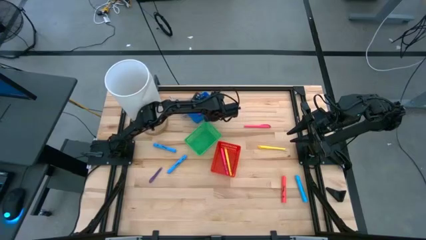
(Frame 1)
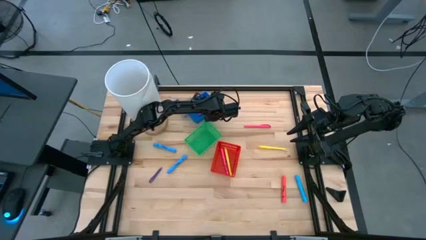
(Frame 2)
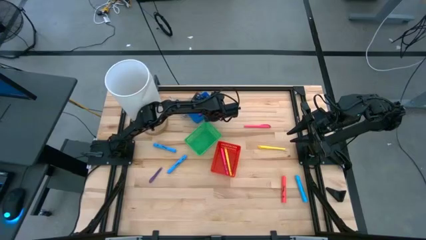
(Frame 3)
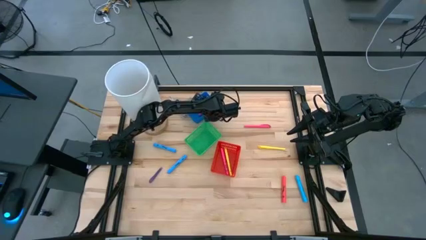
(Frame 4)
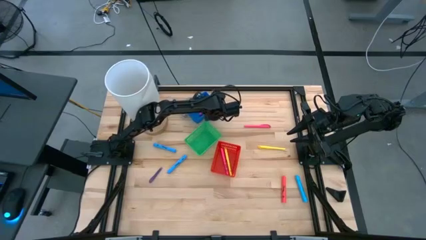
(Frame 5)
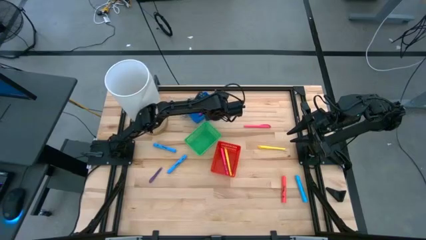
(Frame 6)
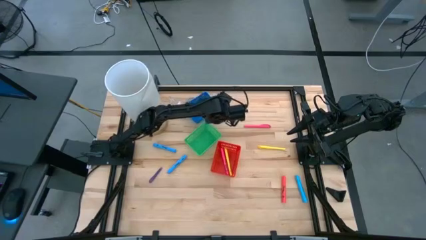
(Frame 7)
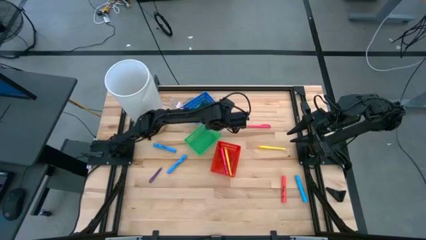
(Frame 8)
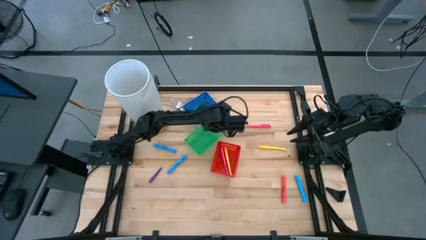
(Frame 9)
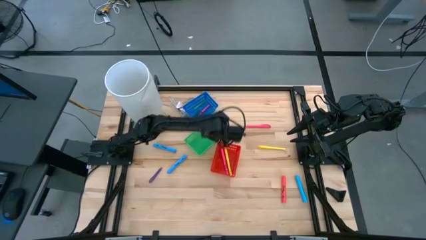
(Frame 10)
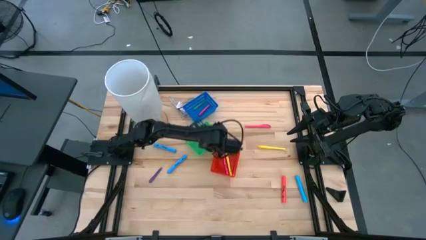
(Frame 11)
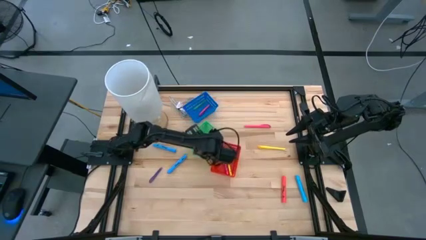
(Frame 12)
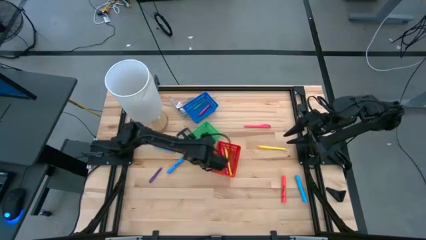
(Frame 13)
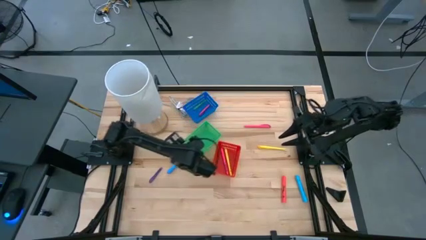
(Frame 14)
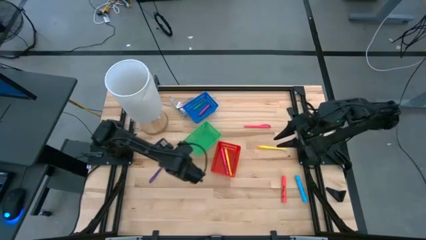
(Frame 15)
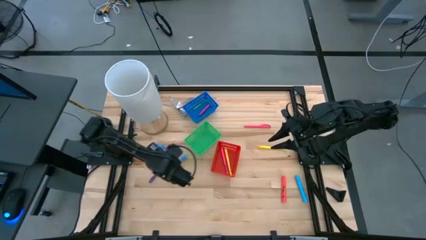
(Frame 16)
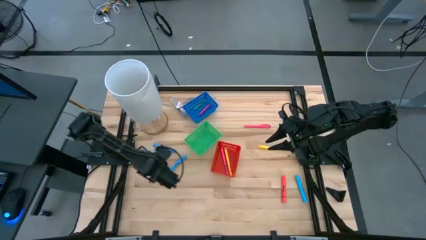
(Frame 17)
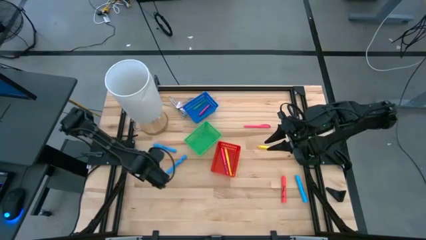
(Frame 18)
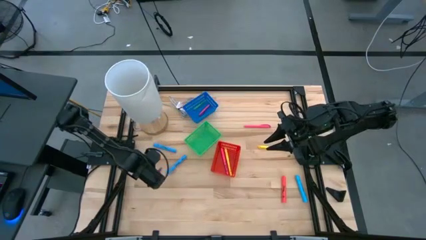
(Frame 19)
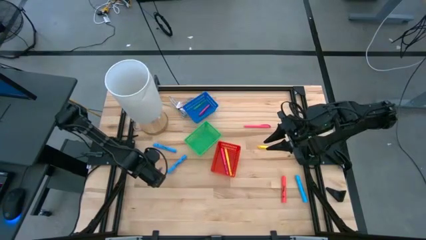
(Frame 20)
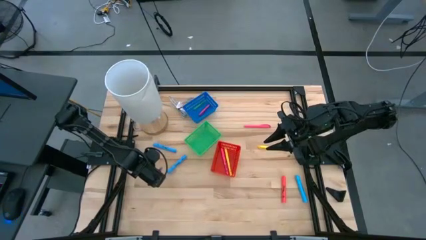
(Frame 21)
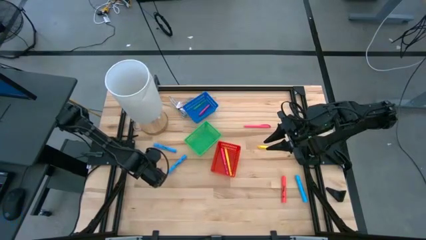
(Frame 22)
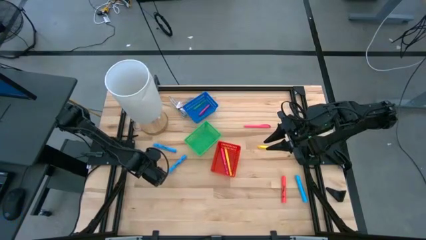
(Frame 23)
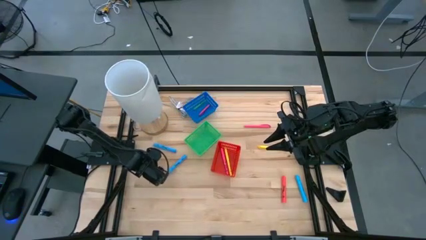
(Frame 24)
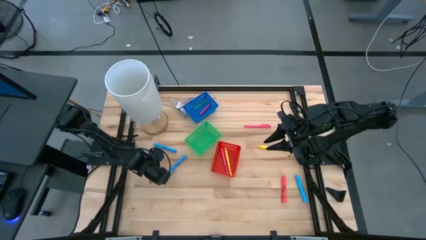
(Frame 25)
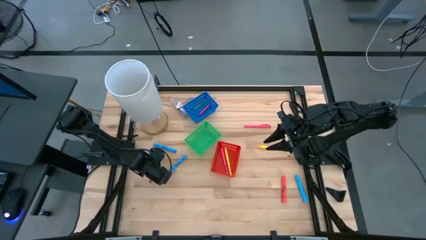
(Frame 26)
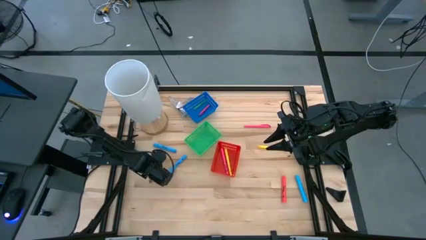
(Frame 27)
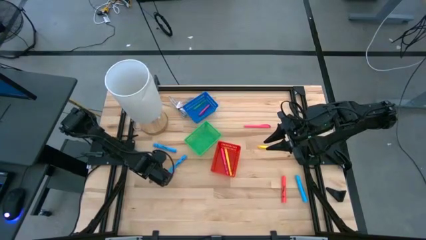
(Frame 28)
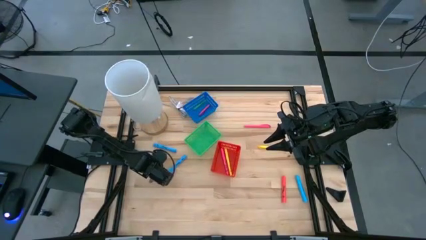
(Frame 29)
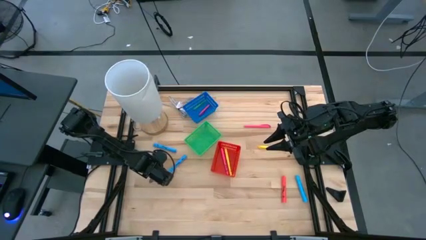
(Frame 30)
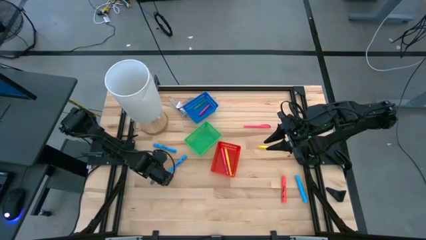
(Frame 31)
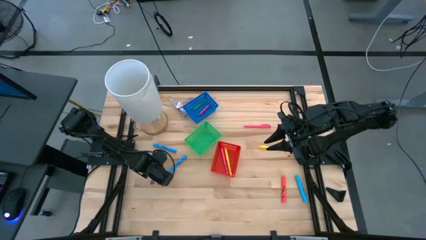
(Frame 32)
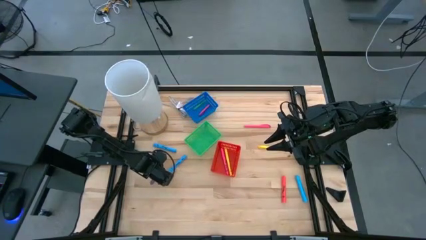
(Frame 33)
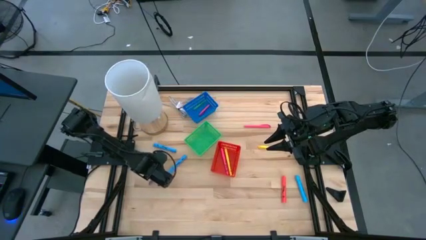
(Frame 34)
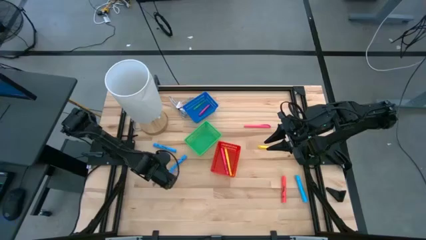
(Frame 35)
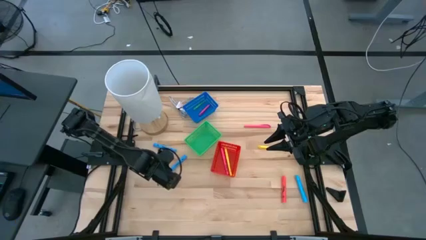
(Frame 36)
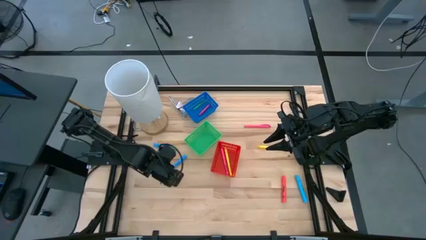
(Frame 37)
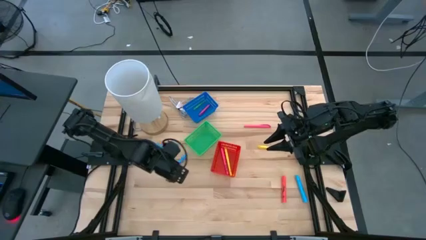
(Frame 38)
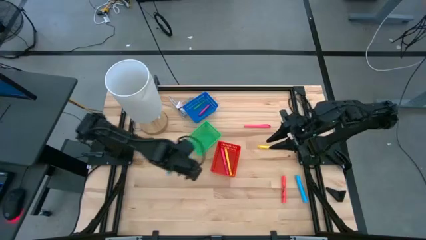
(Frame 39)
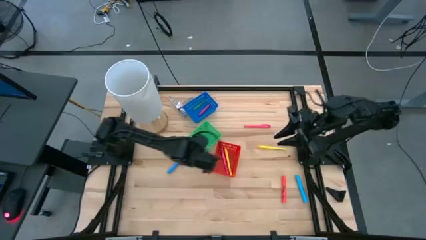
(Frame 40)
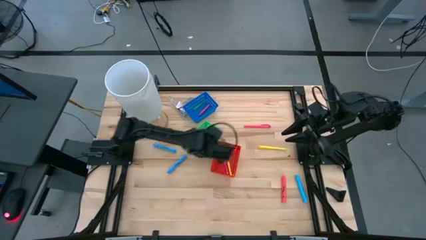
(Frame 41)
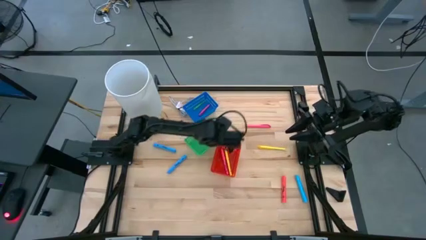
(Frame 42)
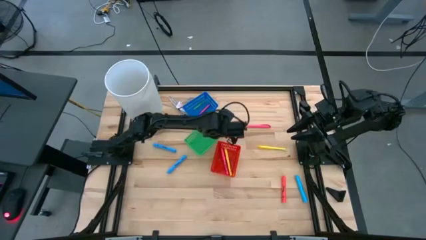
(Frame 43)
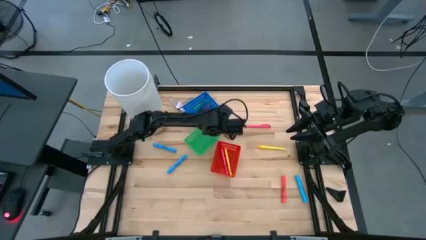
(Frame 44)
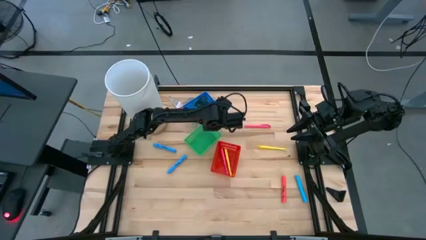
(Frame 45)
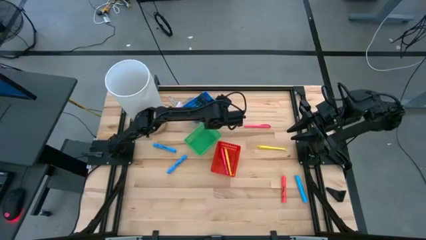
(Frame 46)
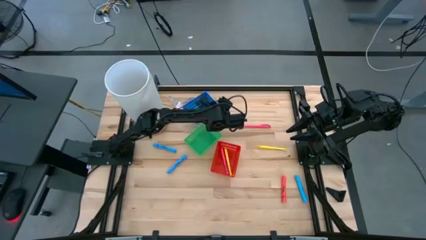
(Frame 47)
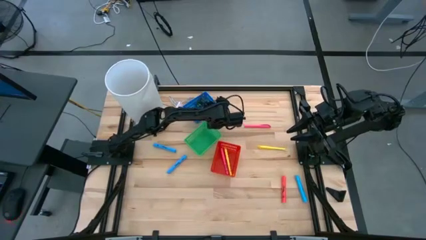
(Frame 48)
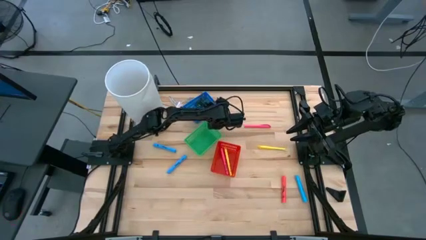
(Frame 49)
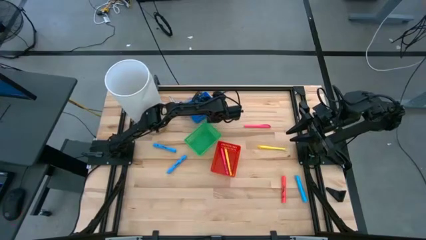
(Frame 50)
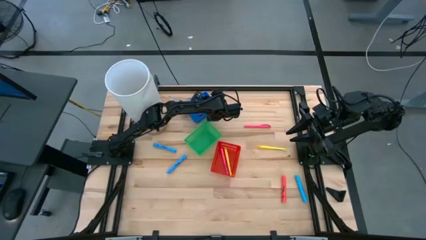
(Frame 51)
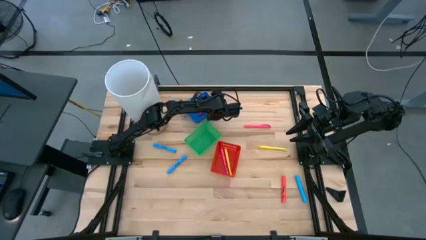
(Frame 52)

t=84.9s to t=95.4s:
Task: Pick & Place Markers
Put the small purple pen into the blue bin

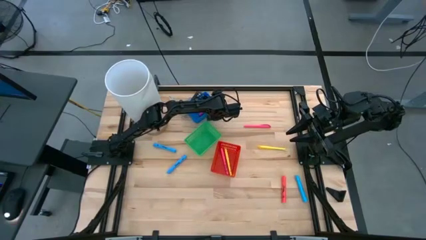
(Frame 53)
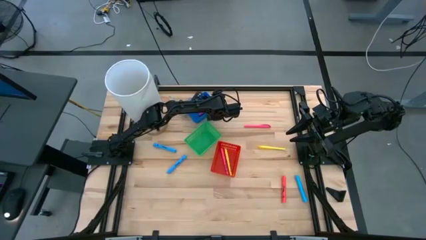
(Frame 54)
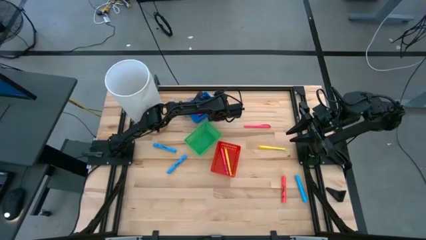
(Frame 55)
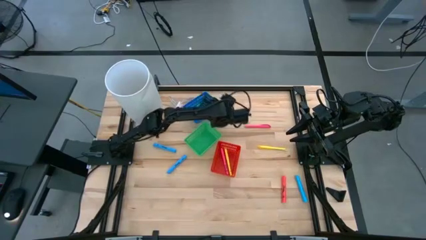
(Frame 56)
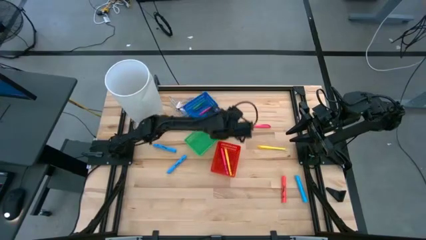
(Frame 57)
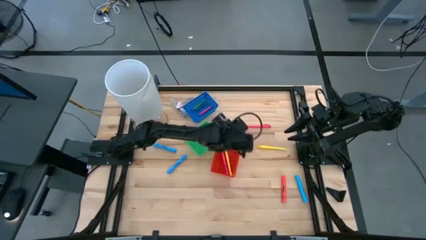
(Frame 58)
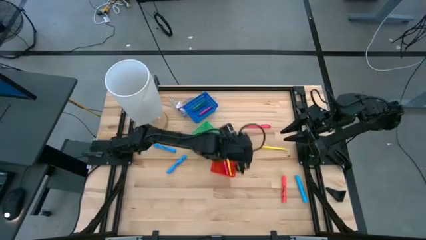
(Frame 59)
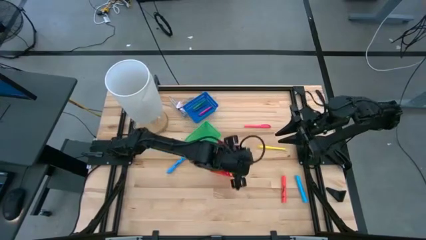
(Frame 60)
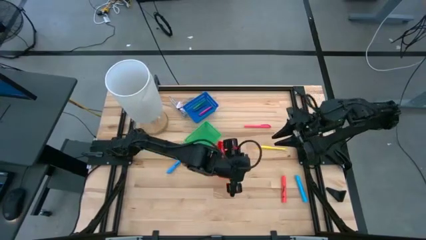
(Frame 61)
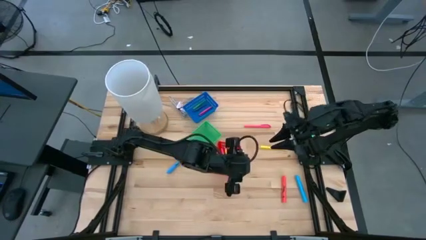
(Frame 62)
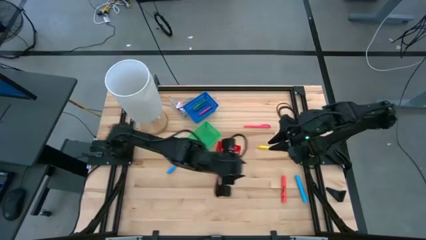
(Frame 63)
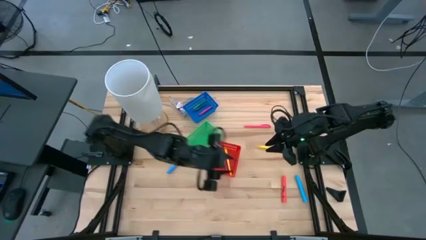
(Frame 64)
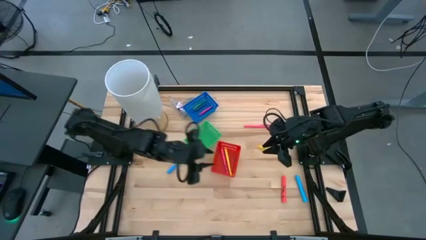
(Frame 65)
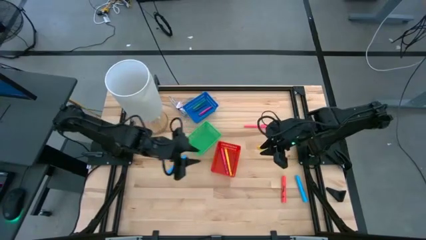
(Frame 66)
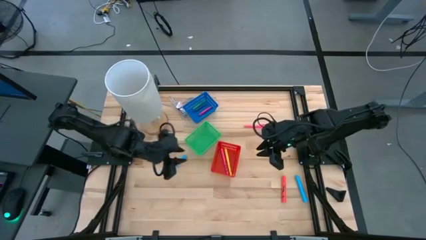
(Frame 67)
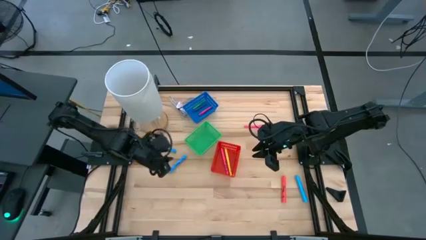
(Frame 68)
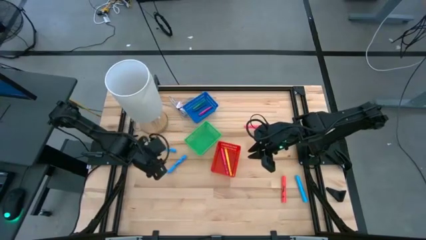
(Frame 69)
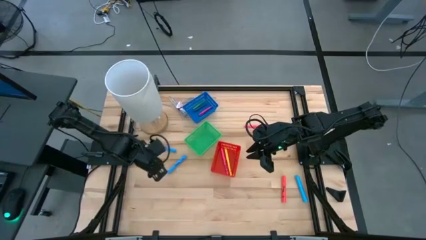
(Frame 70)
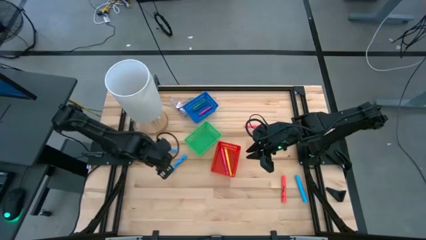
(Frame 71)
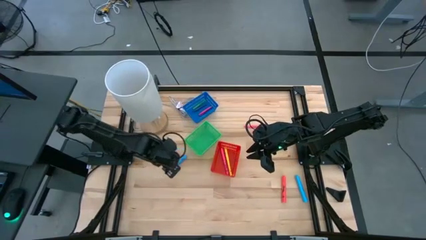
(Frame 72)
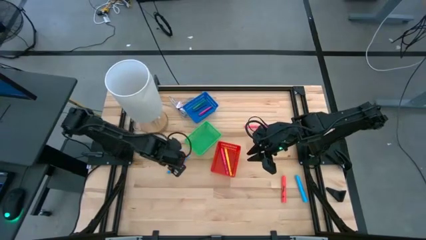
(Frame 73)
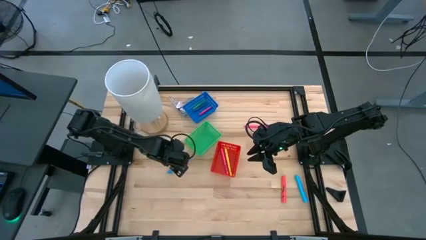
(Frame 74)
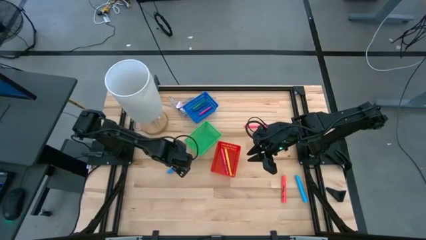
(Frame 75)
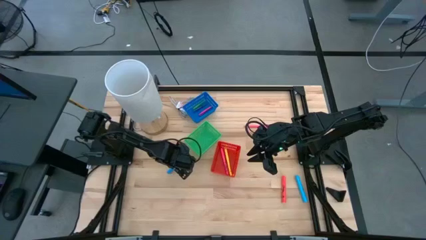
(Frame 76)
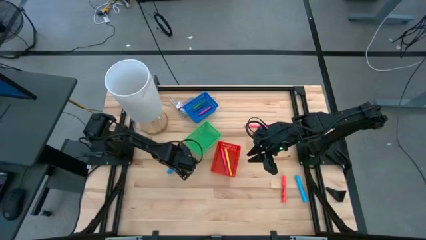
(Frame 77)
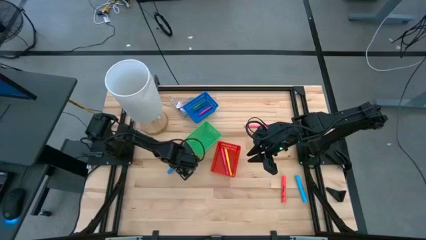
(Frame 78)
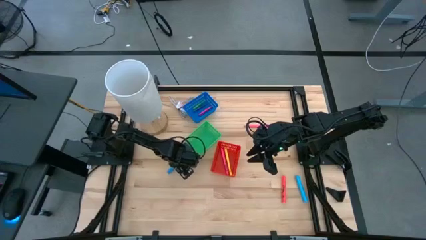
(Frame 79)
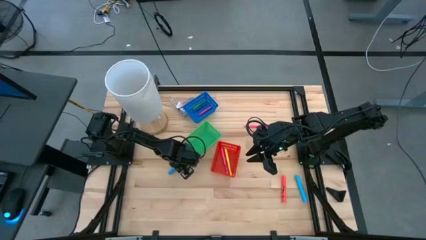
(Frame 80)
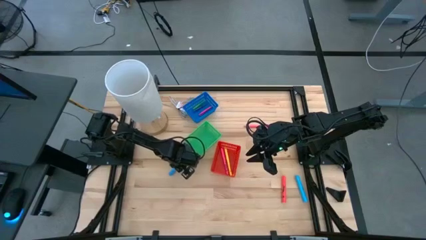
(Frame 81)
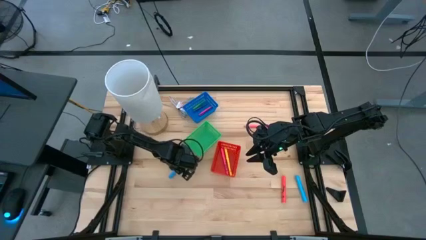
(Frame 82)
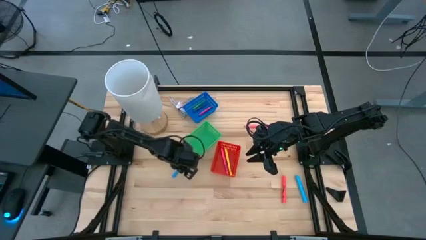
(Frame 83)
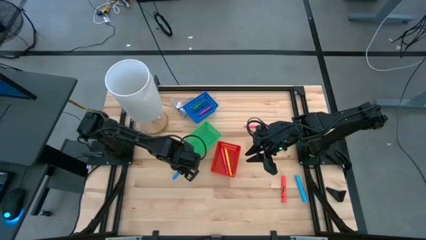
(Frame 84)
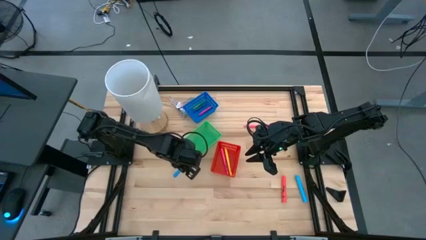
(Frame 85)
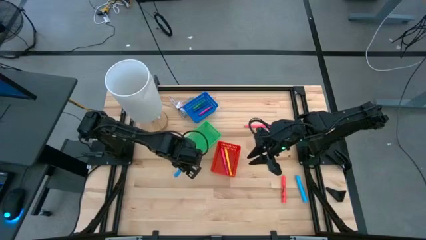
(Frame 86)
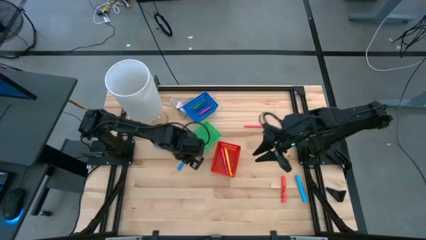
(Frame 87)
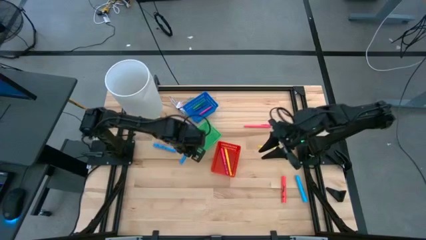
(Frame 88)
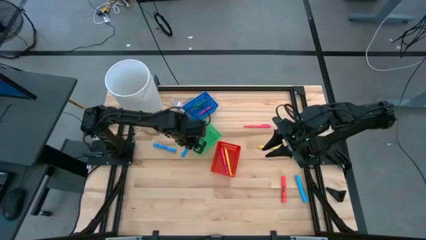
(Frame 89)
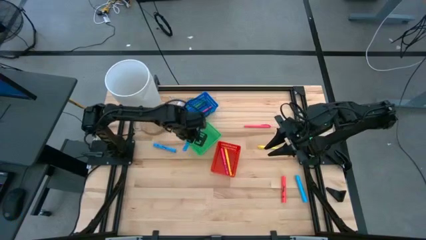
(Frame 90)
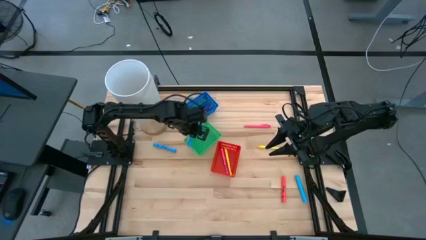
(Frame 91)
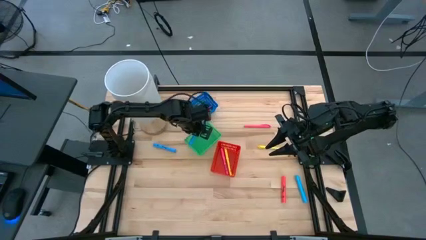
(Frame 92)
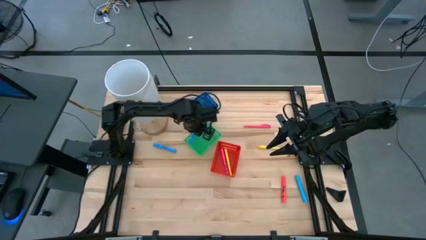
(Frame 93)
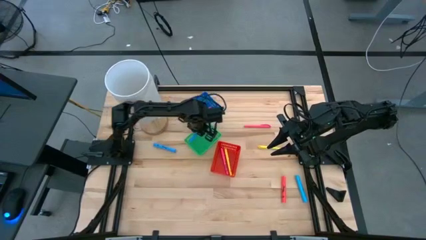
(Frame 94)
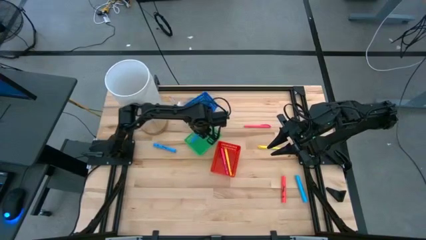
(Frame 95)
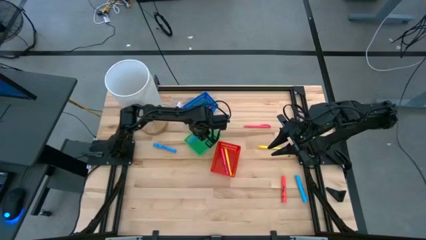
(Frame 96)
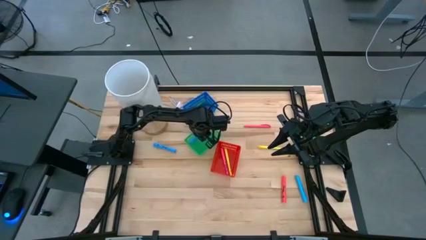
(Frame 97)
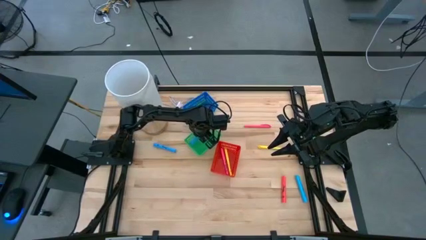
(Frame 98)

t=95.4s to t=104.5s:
Put the bottom left blue highlighter pen into the green bin
